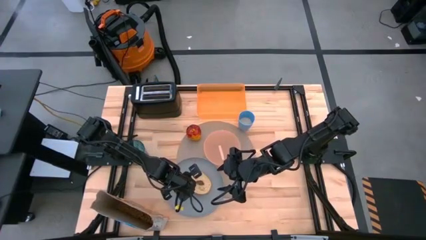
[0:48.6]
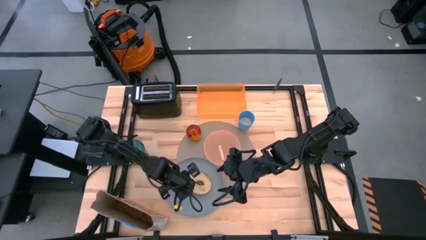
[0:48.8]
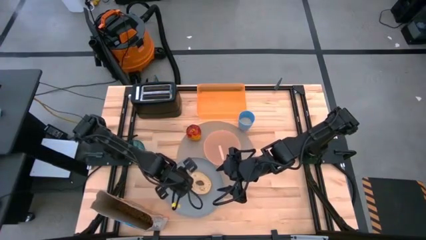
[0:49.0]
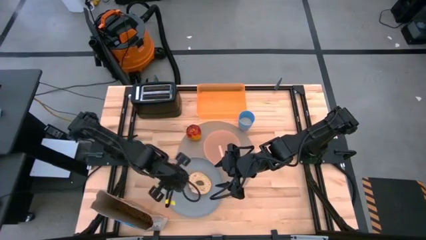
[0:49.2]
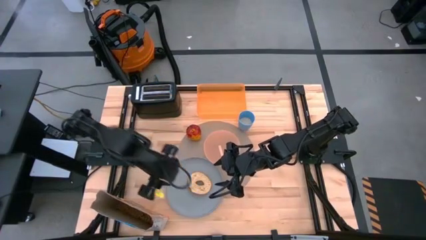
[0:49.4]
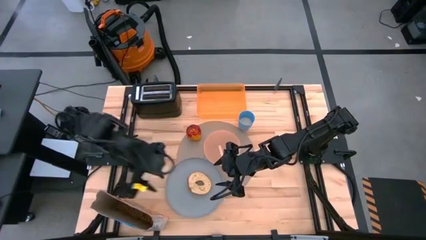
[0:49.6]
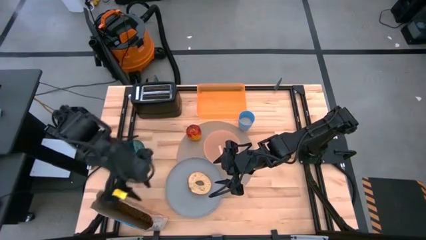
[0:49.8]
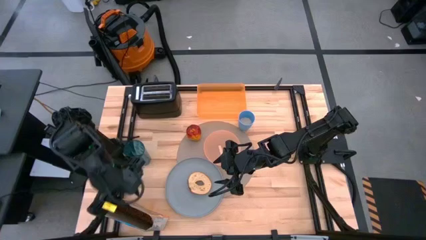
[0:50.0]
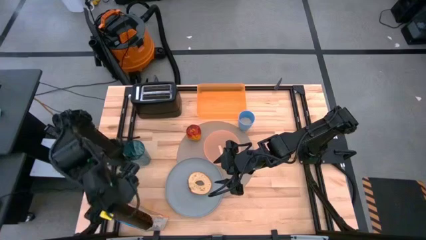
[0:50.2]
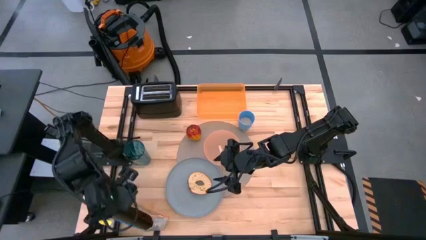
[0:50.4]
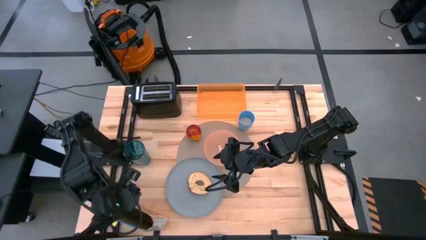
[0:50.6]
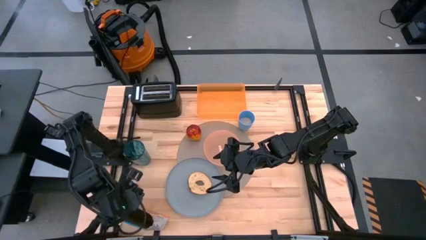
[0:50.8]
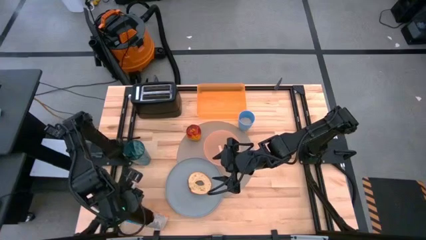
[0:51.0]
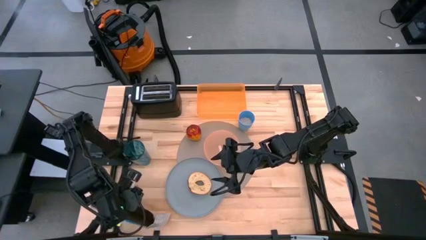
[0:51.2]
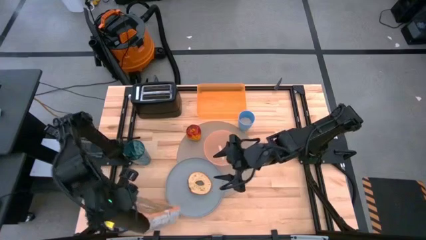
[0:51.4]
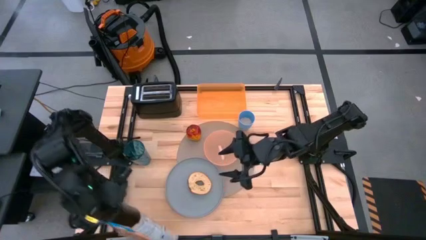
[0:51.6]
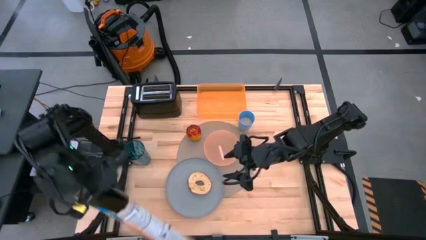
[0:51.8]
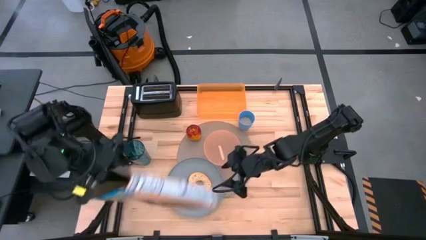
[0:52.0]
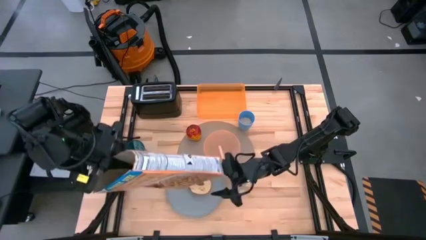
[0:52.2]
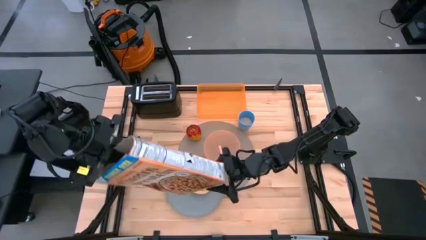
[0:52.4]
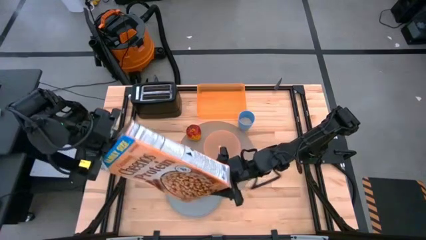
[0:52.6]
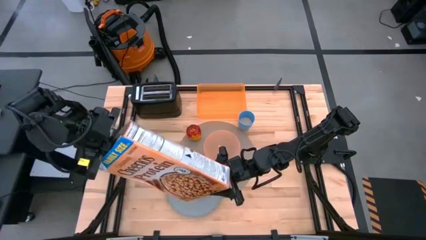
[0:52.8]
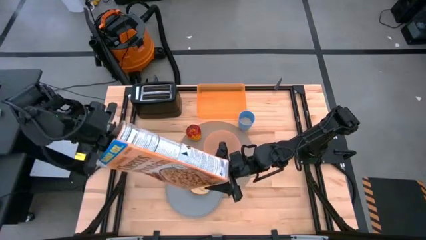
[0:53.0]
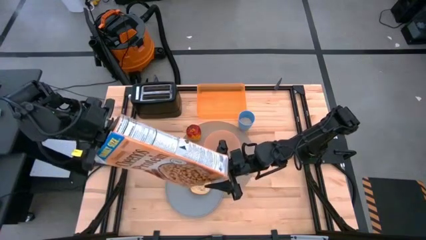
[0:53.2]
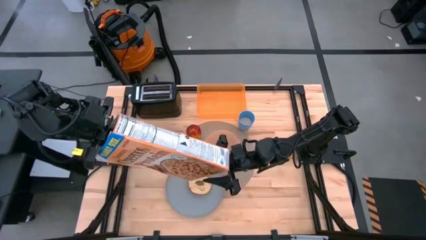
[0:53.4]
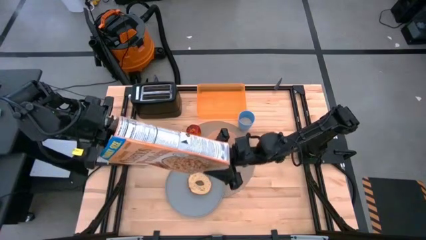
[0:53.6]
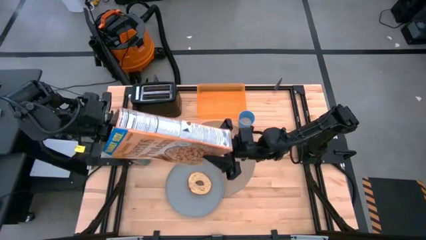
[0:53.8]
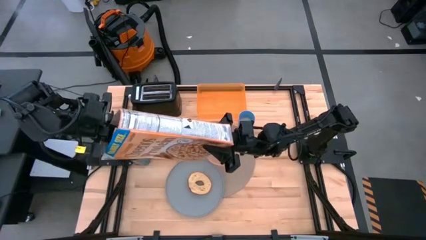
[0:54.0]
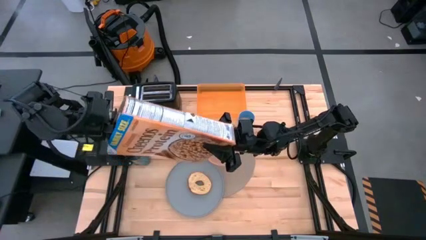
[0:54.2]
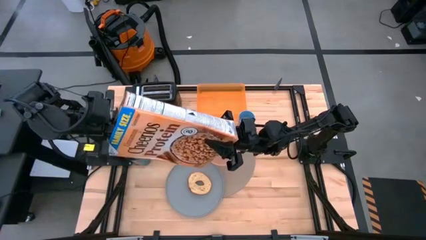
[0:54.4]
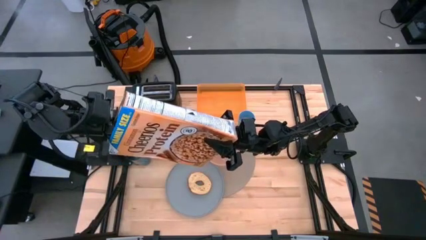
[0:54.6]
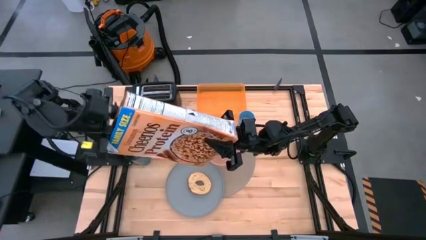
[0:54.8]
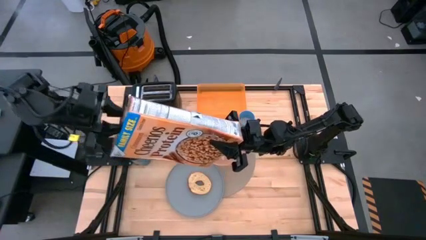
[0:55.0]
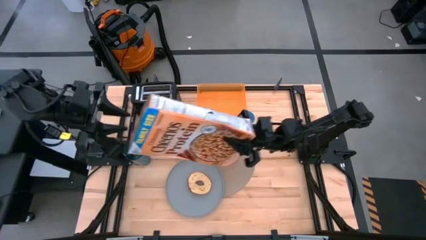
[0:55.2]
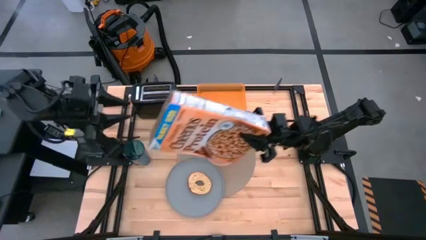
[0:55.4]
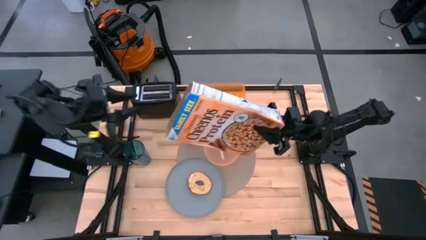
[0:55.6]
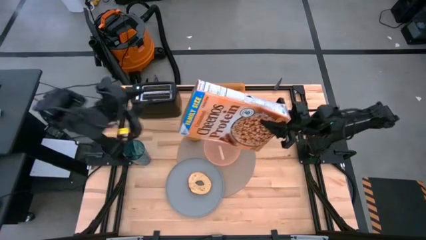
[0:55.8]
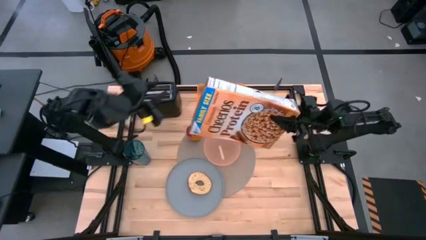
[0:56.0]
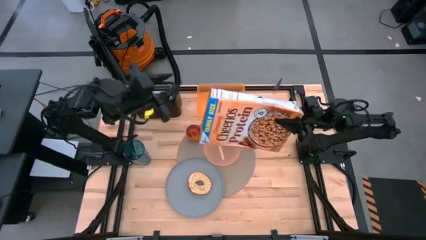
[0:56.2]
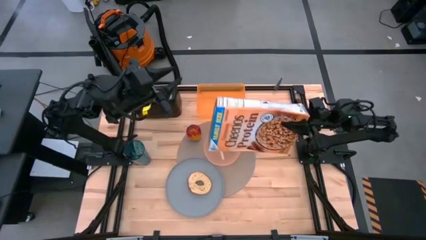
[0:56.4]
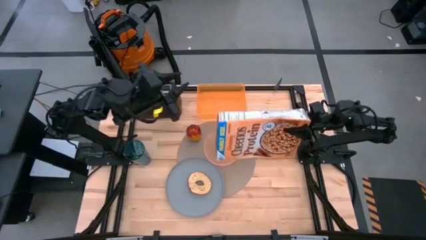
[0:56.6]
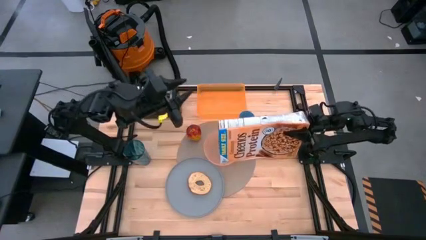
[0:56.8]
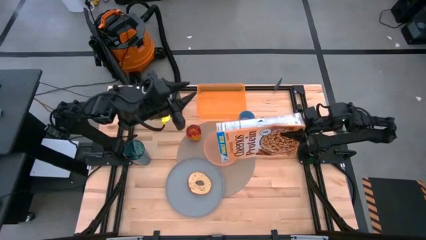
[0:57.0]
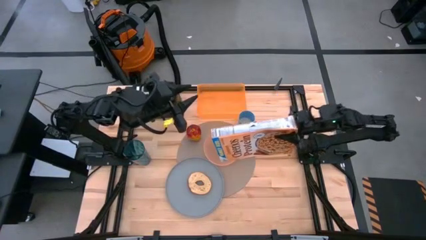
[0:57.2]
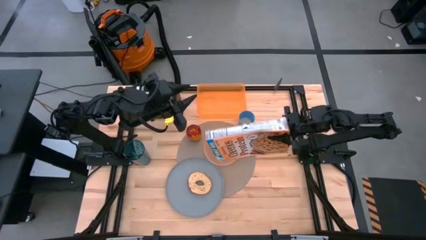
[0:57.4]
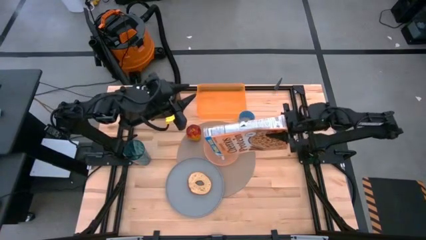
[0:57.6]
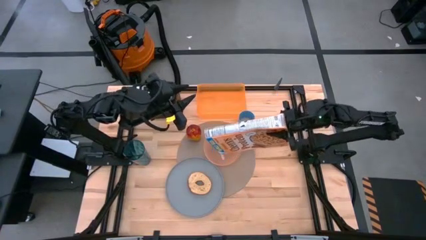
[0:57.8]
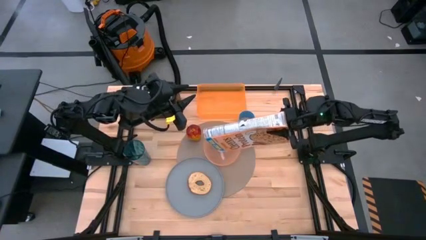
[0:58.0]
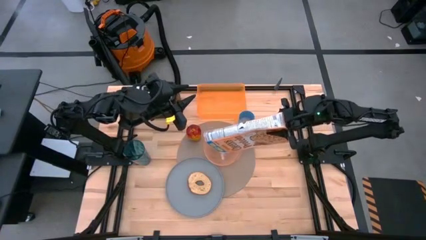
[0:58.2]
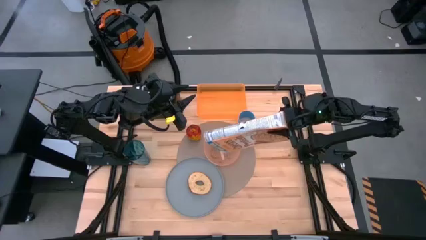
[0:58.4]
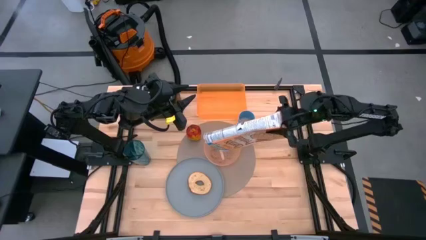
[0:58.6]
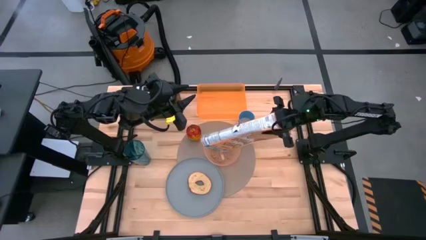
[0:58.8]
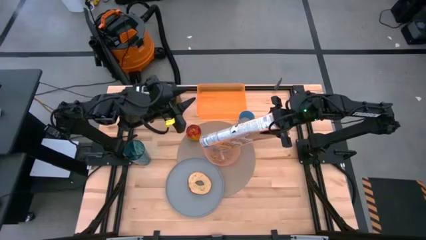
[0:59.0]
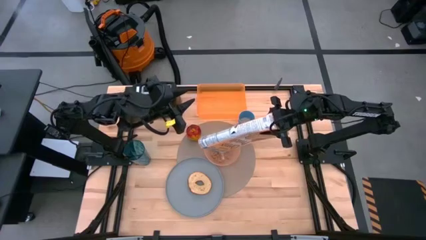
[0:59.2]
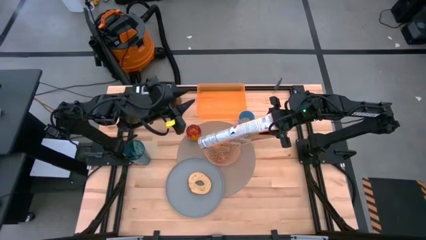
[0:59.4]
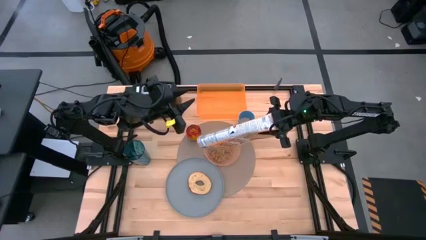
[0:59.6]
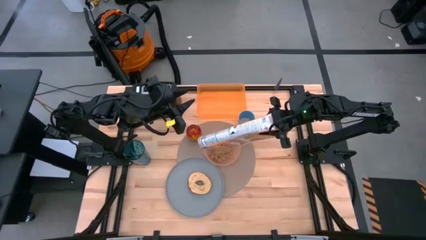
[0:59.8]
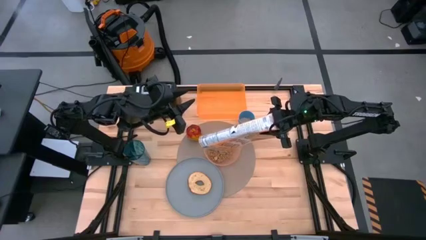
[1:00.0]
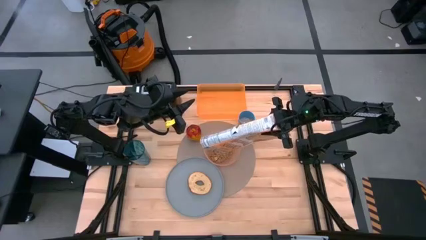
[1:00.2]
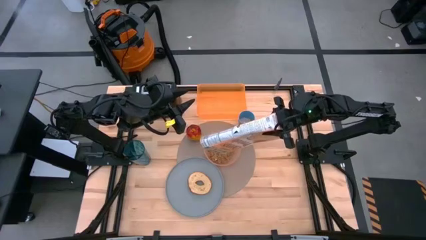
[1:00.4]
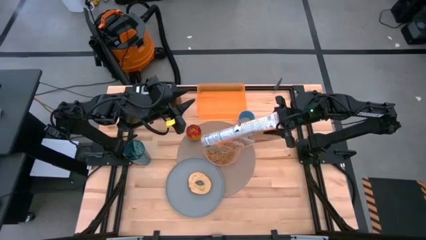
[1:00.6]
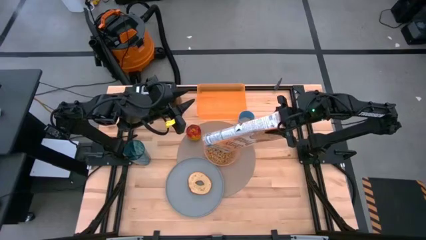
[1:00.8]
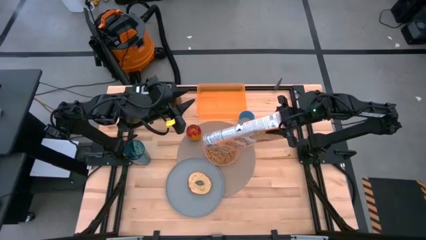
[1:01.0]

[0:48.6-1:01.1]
Task: Arrange a breakfast setting
Pour the cereal from the orange cereal box into the pink bowl

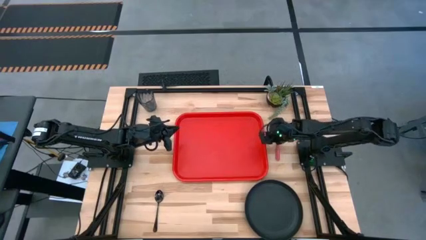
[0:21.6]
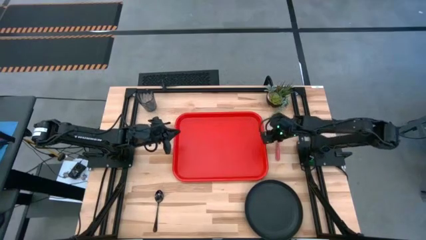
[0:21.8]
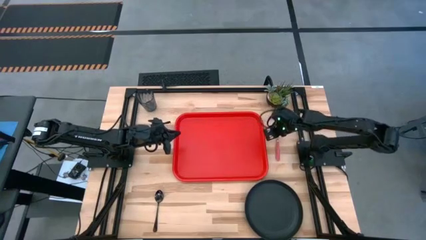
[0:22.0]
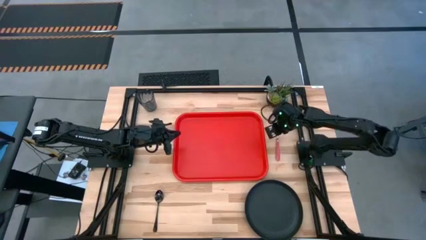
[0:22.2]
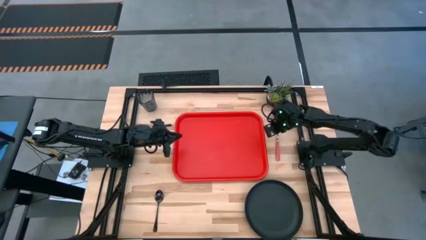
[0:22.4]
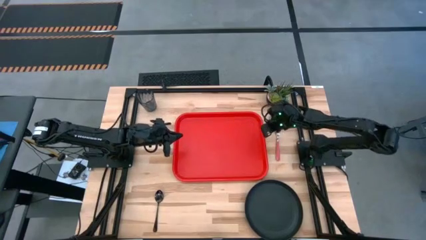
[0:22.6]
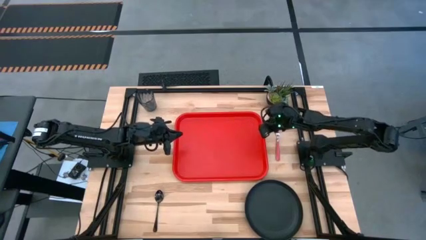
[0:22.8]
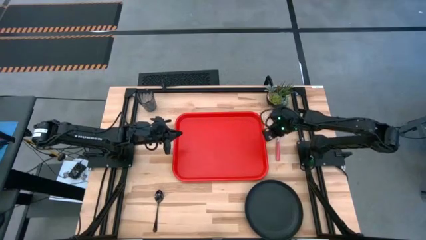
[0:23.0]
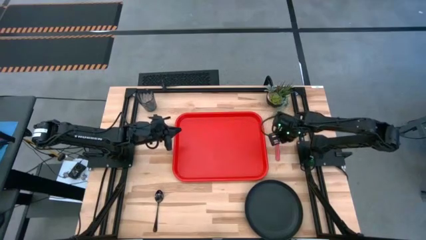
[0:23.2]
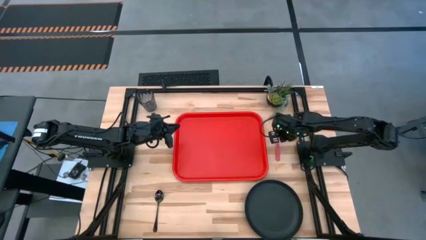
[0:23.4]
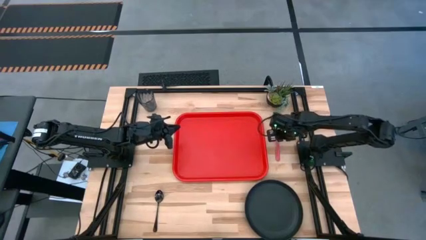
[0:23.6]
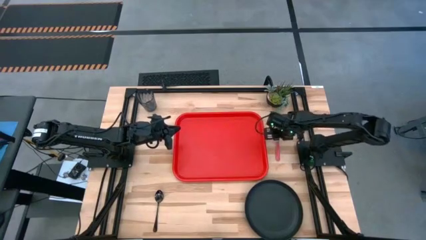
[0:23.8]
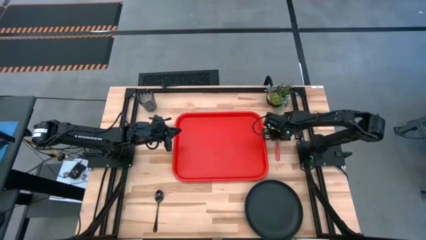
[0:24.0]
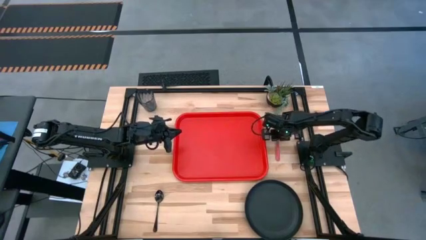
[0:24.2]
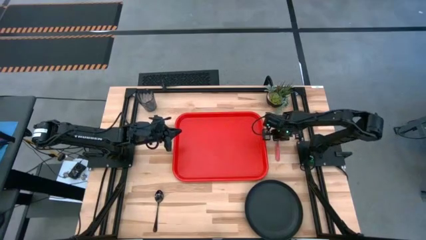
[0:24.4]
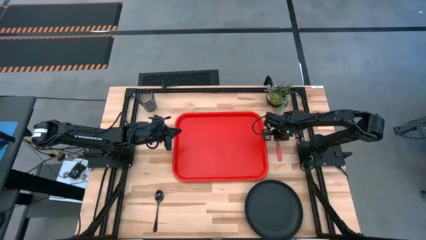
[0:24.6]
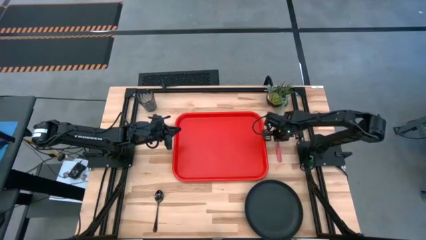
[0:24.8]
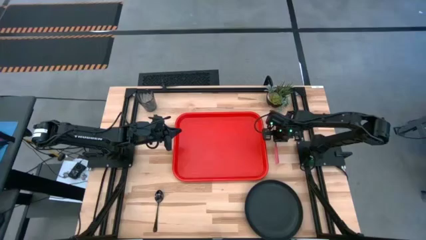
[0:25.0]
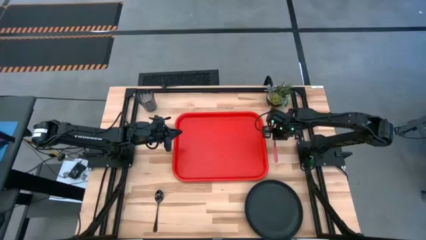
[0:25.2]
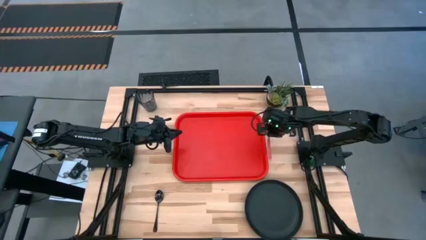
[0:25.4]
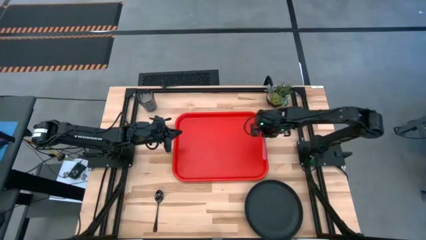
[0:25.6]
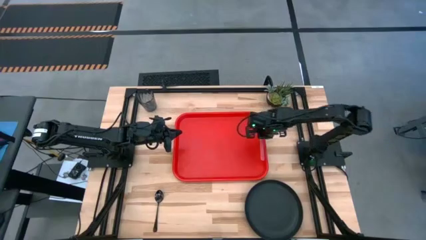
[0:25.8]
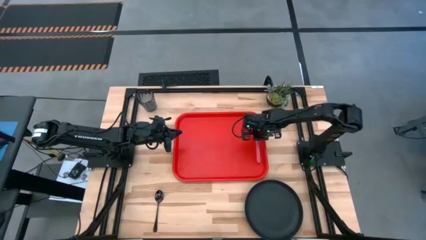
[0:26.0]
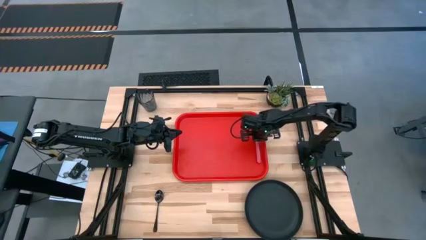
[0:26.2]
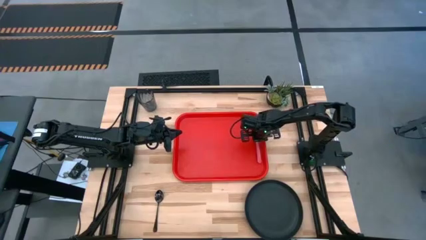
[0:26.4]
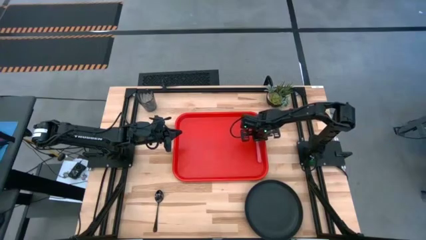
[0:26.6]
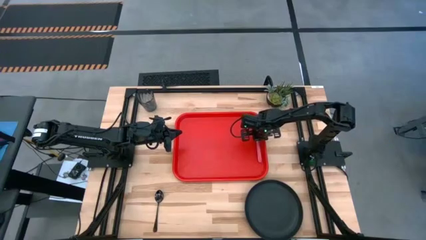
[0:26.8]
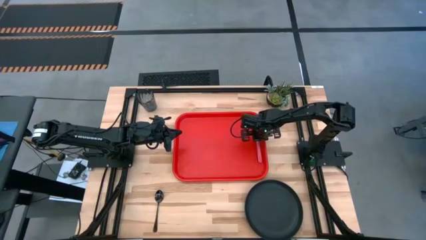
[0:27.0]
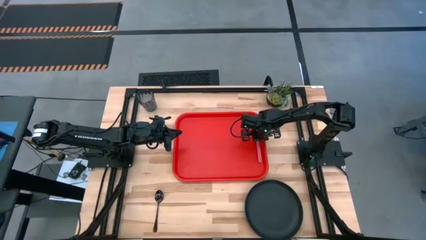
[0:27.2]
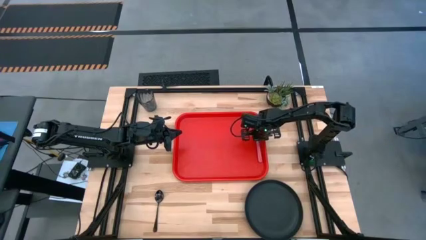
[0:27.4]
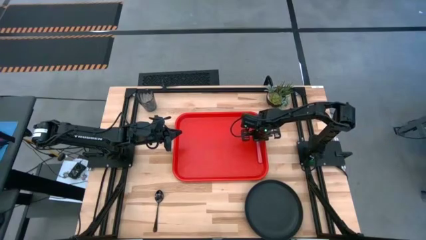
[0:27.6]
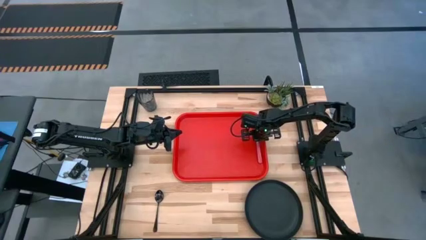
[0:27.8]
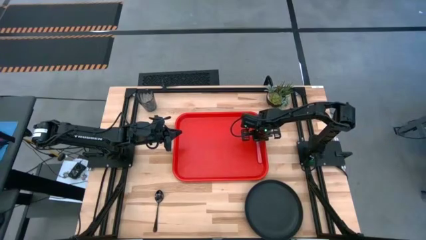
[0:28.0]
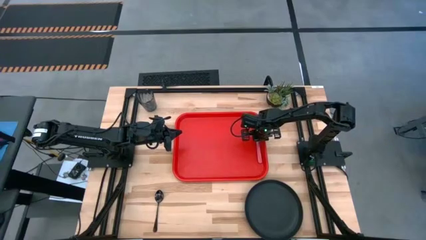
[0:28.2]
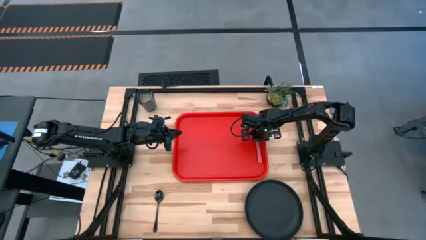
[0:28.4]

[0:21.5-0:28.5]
Task: Pick and place plate/cup/fork/spoon on tray
Put the pink fork on the red tray
